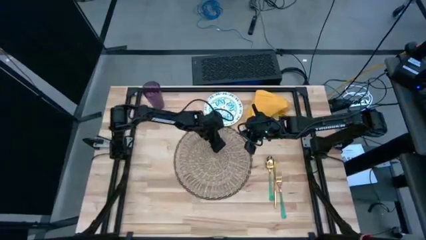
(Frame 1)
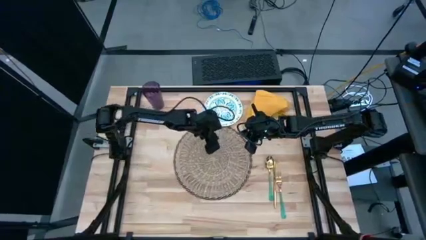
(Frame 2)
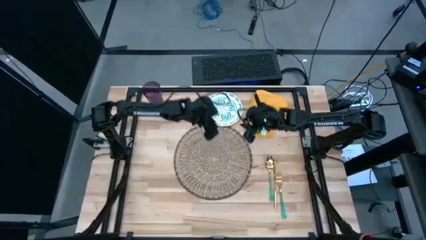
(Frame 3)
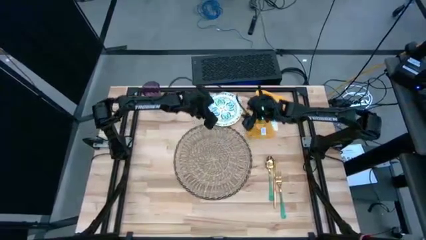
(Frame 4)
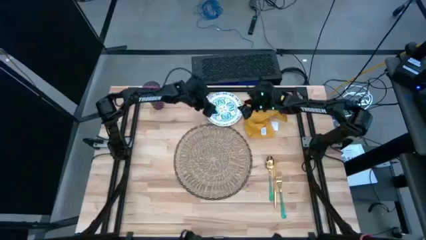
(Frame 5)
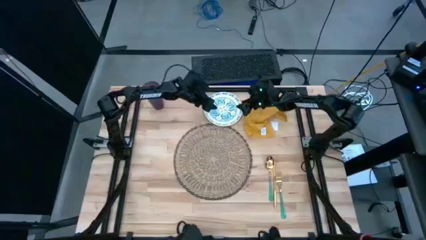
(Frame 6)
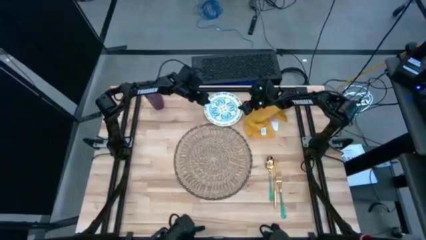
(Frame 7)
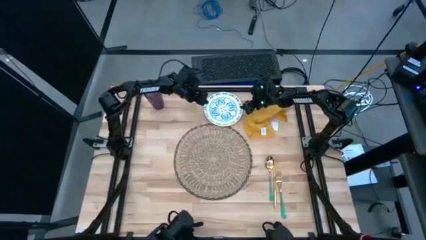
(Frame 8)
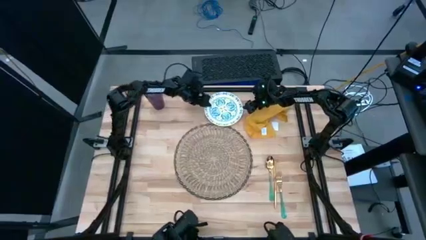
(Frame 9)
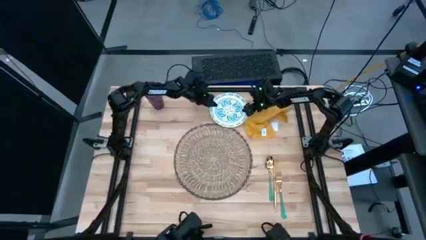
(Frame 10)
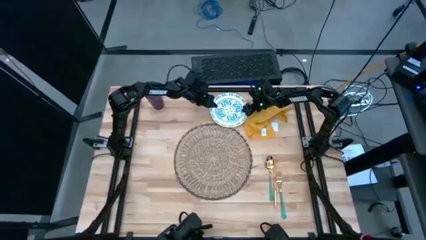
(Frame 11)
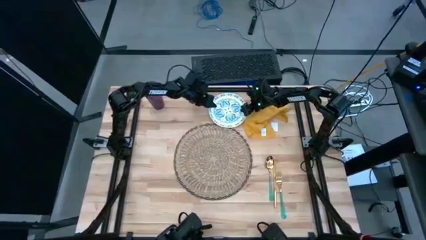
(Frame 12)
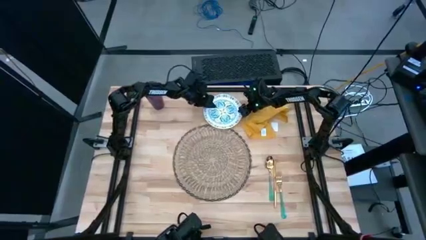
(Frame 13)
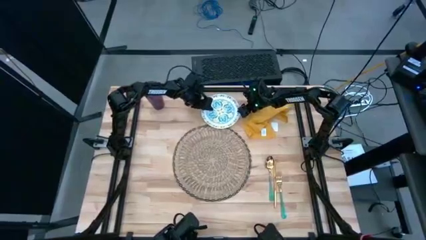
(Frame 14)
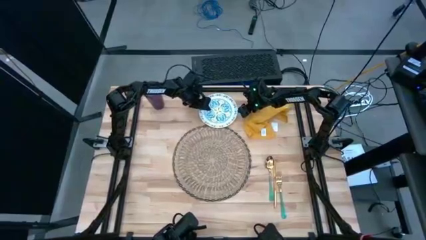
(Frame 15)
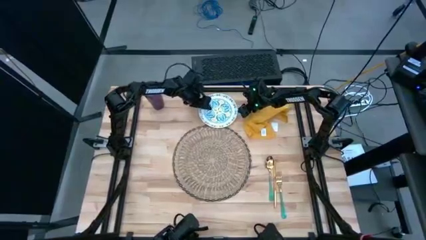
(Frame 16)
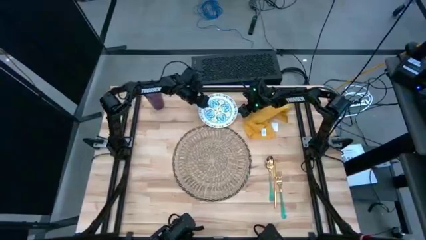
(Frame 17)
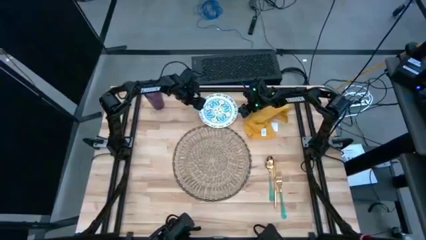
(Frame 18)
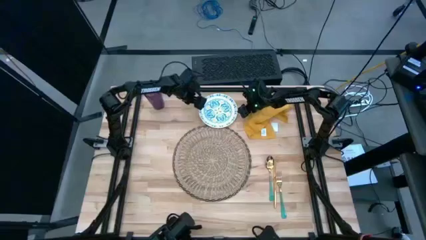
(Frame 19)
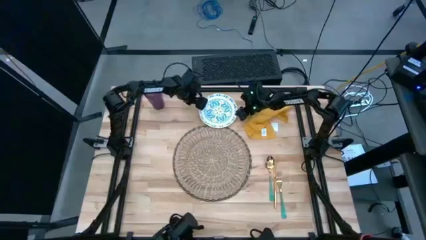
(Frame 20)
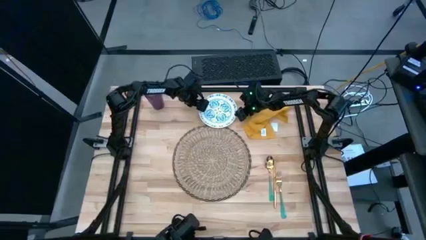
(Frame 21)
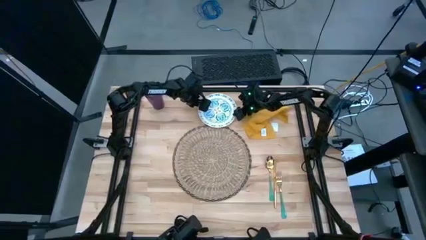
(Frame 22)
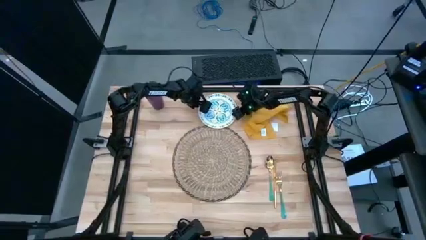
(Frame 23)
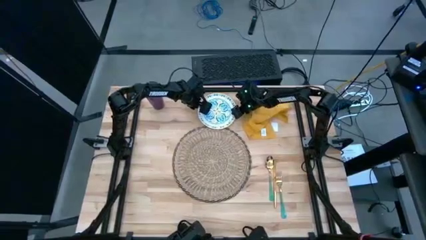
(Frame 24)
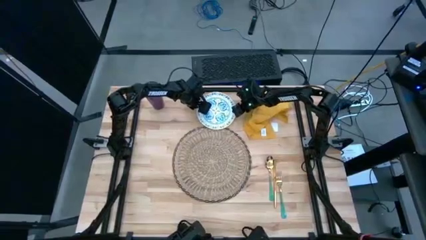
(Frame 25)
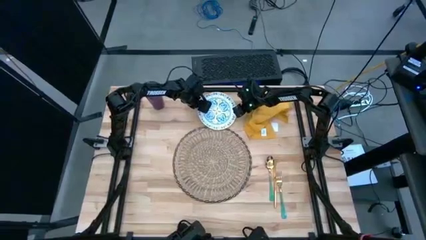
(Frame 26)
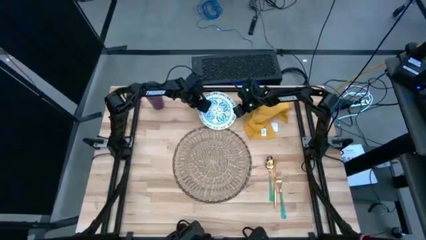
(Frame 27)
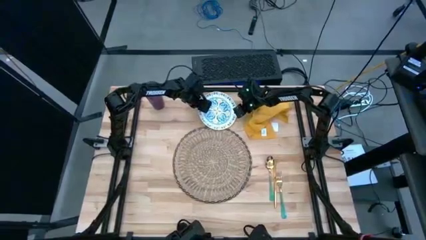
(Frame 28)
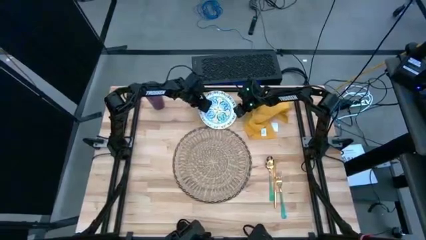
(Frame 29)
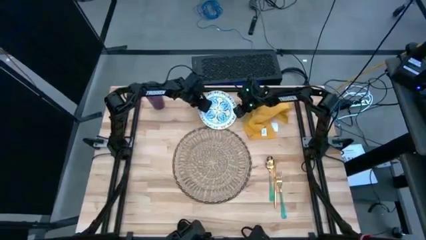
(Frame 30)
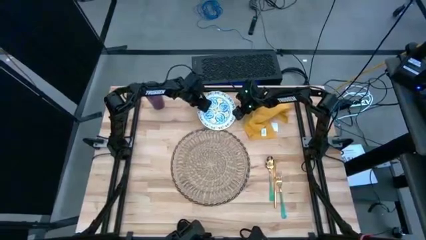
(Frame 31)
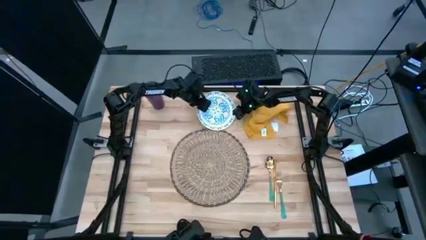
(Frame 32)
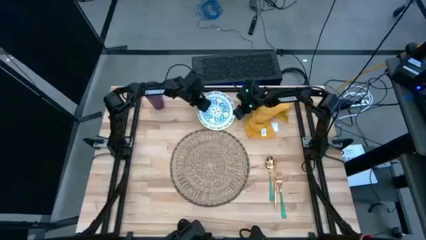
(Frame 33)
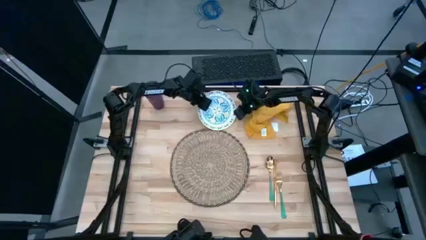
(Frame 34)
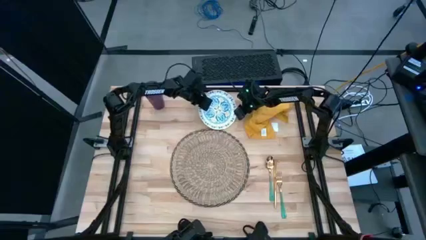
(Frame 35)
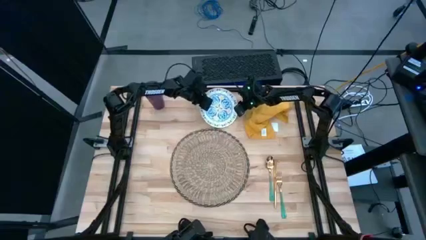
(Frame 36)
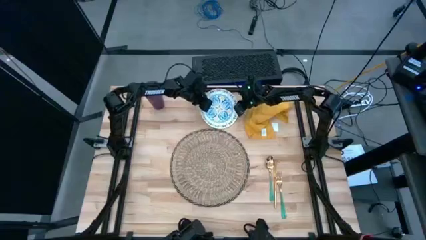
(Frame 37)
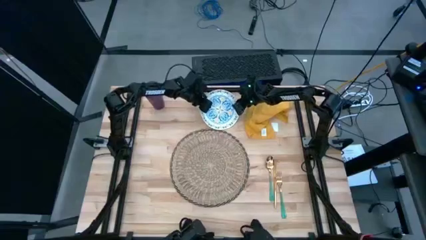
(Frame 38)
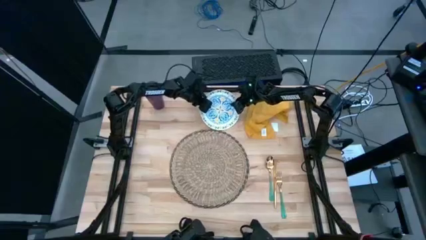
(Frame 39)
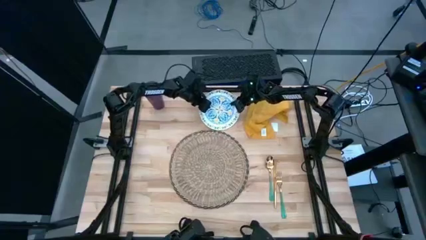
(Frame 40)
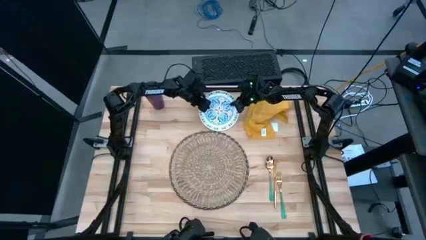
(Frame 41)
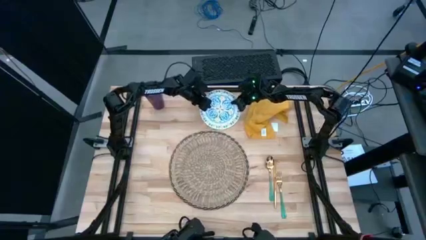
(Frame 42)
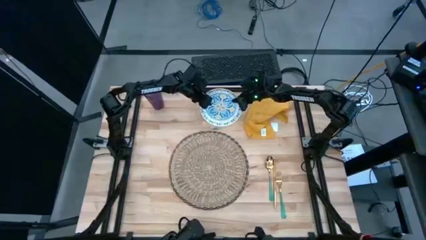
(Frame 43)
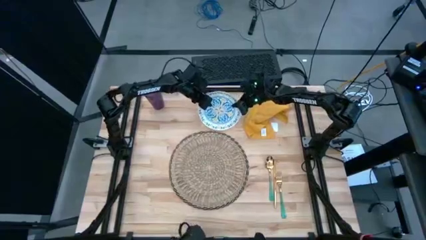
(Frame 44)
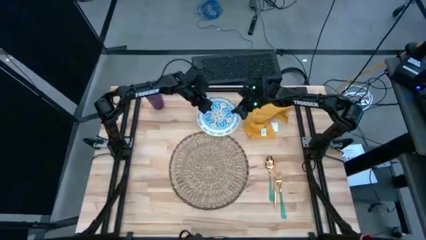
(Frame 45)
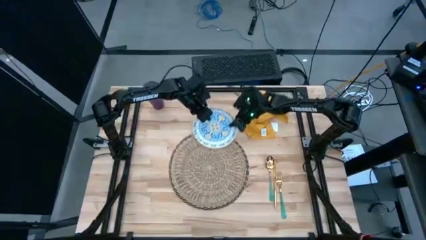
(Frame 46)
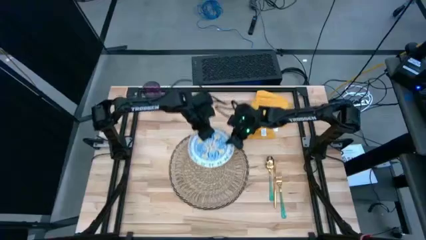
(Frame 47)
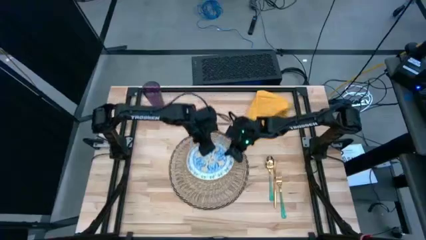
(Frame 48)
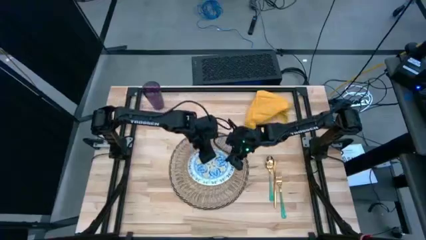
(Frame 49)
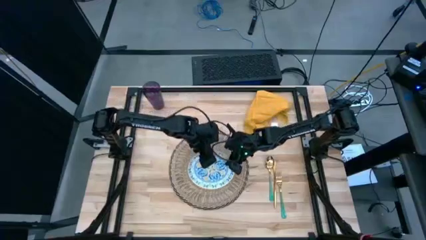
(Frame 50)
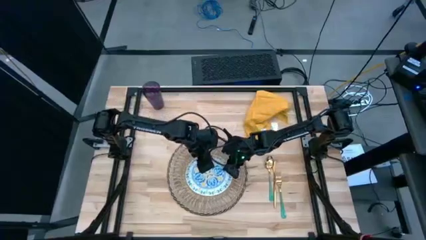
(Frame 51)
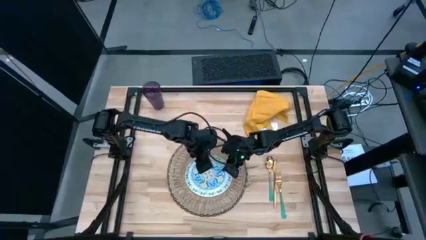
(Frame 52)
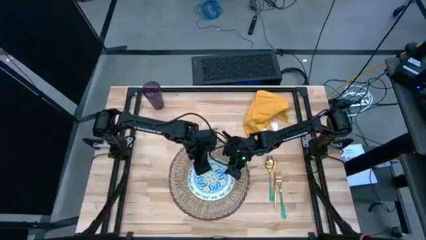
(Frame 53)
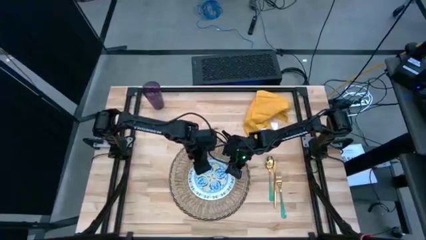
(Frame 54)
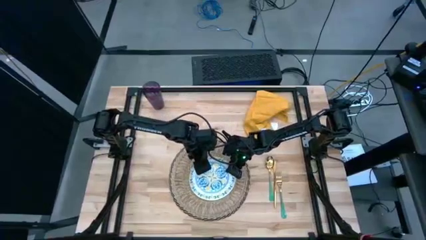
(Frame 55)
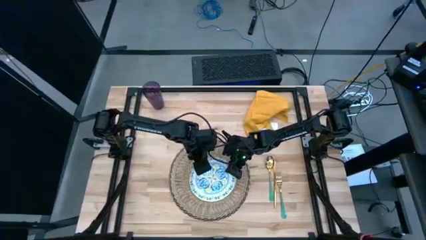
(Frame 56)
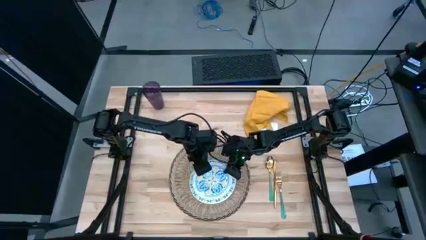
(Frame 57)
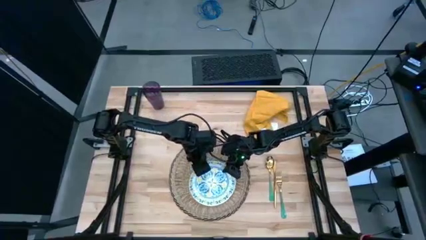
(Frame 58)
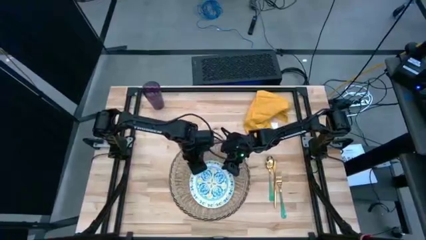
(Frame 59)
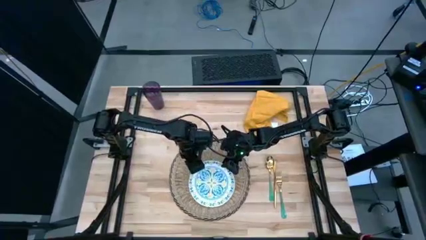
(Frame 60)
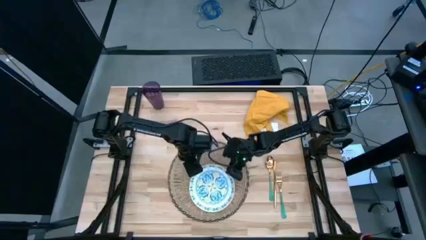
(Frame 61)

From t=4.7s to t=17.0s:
Task: Set table place
Put the white patterned plate on the tablemat
